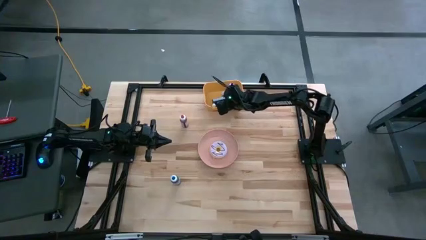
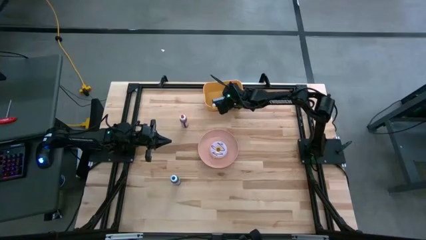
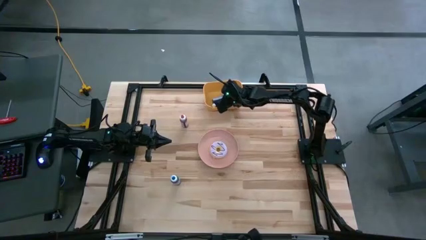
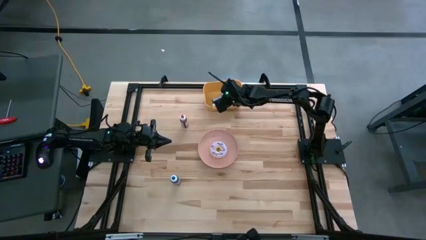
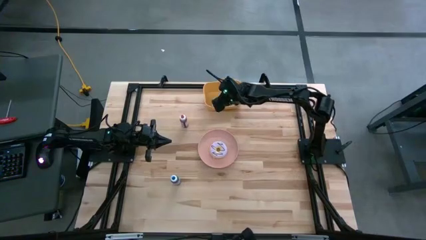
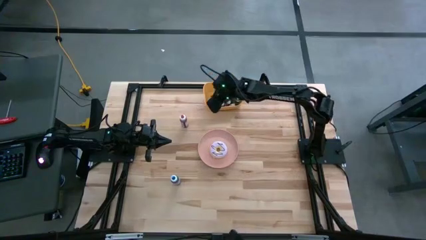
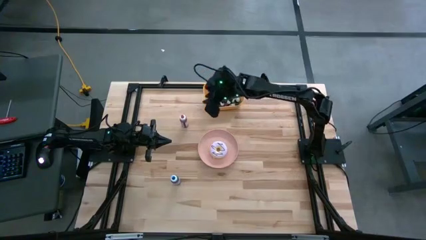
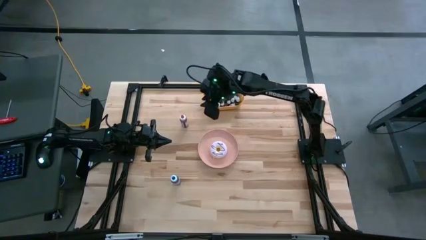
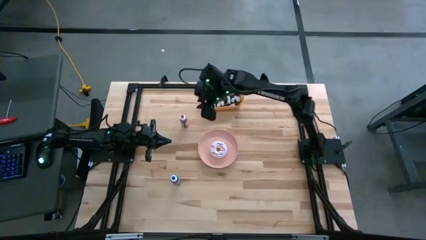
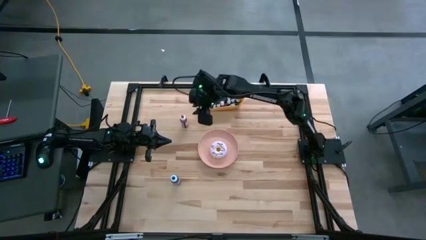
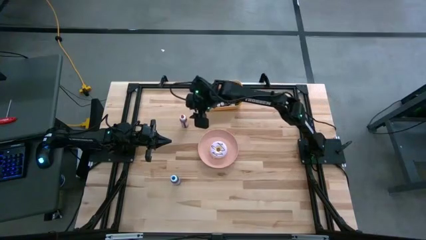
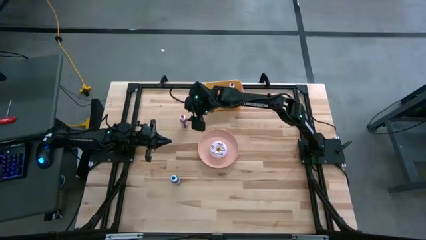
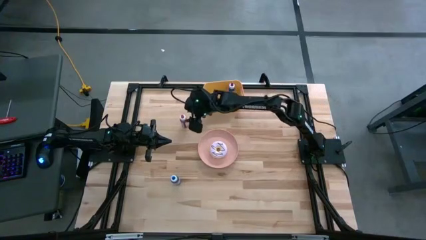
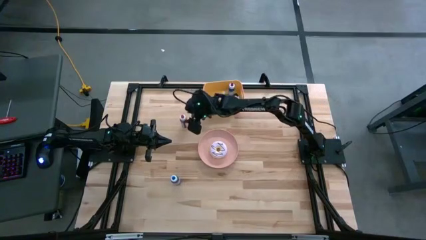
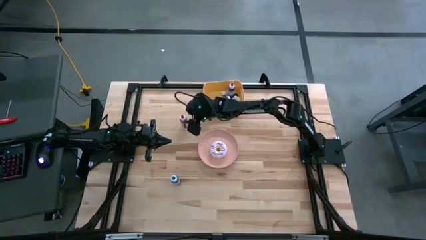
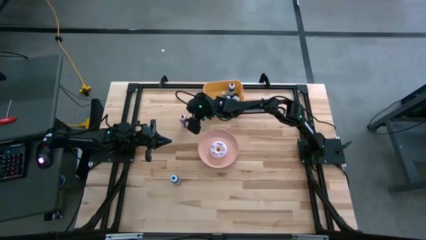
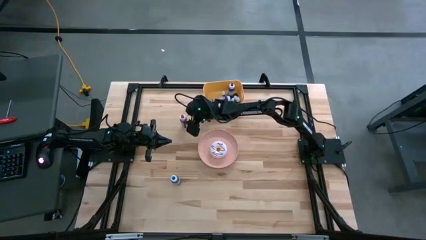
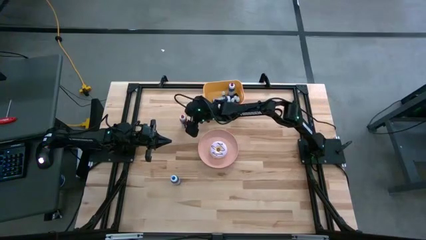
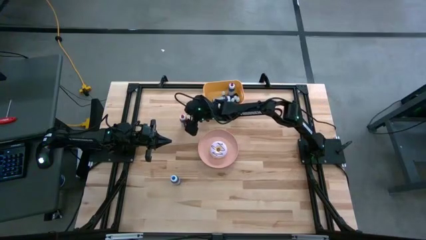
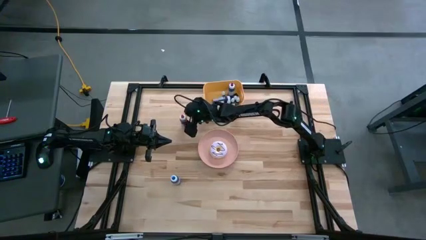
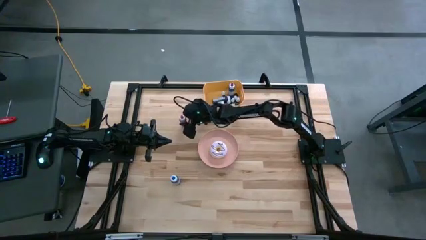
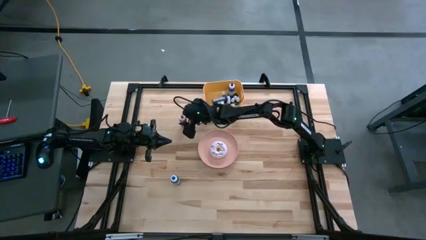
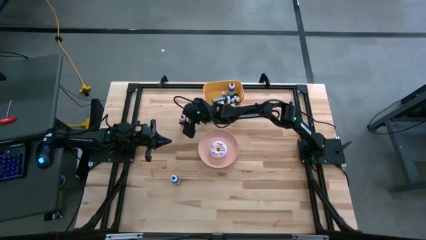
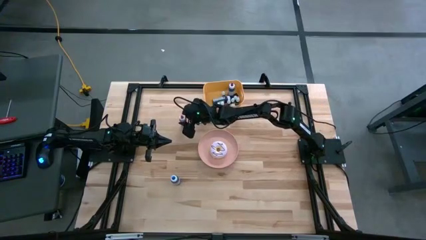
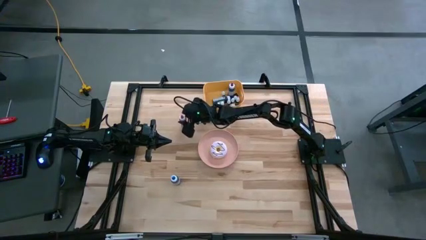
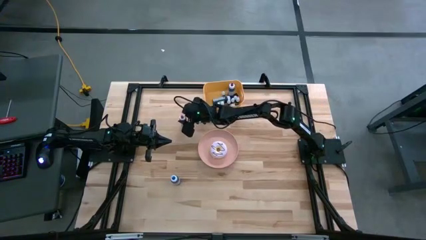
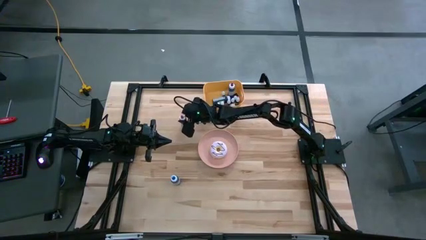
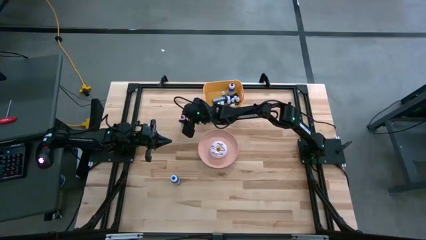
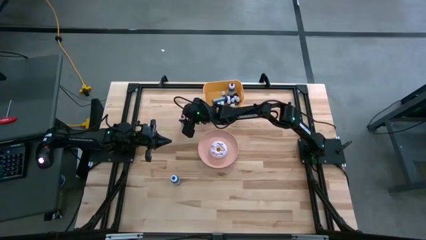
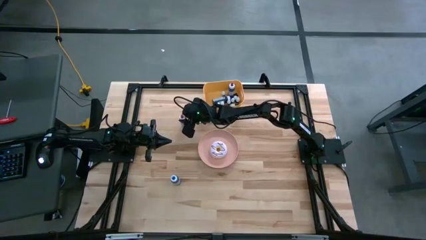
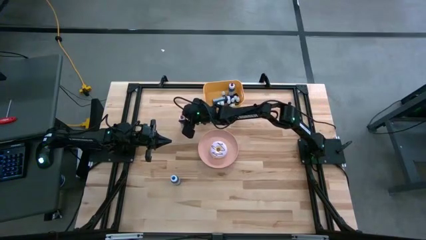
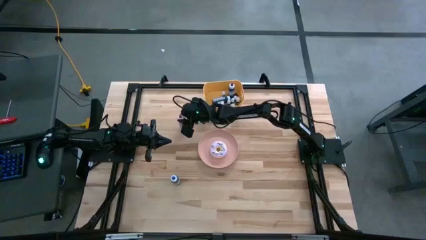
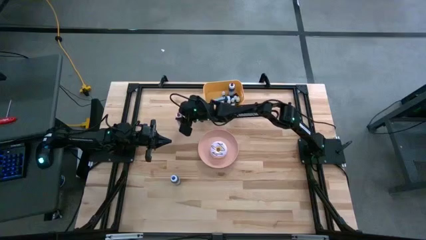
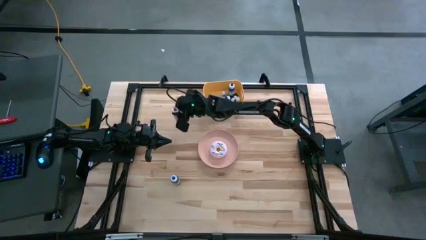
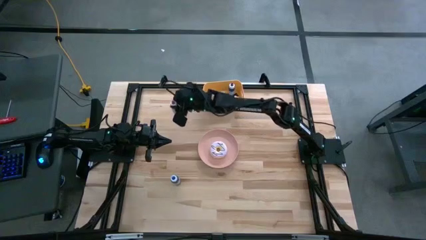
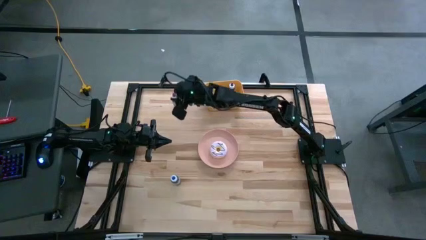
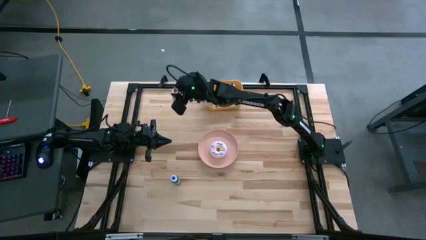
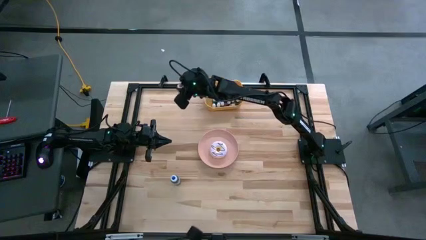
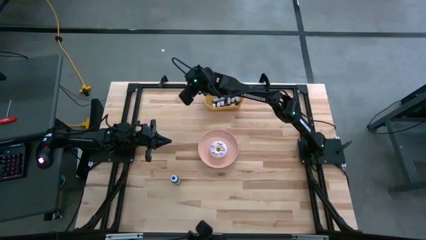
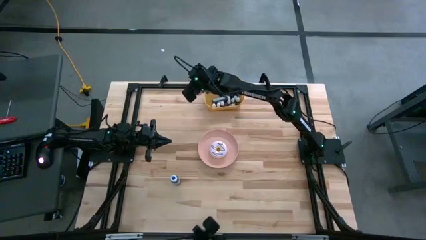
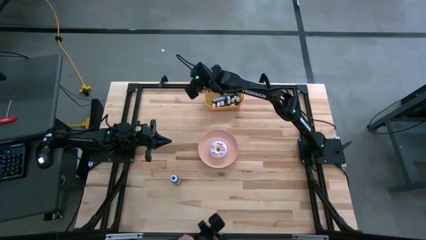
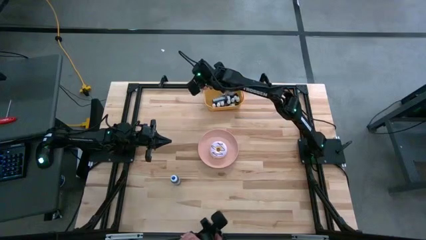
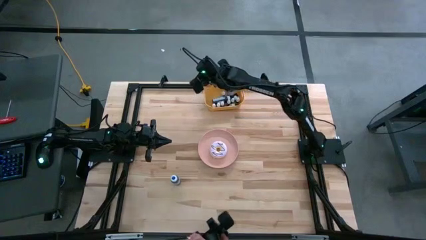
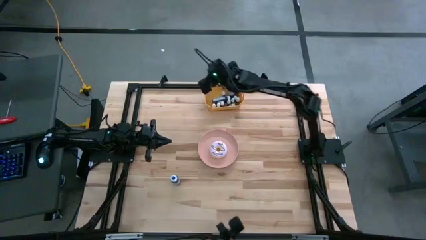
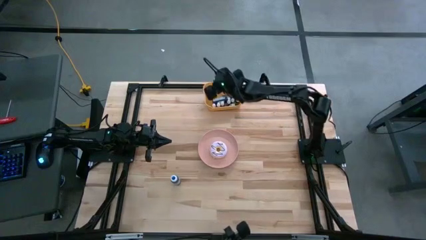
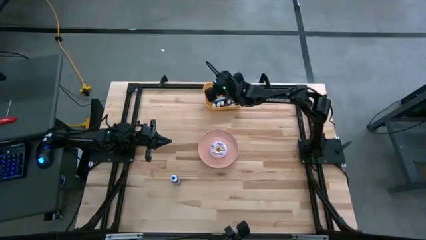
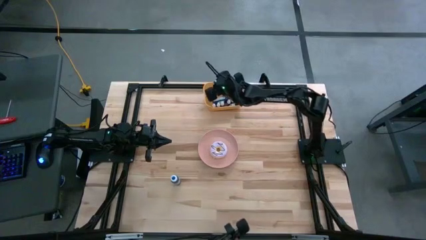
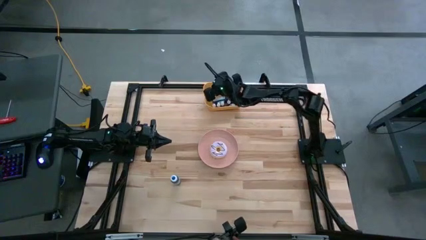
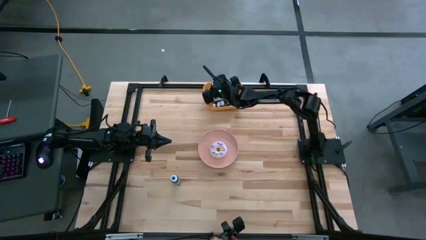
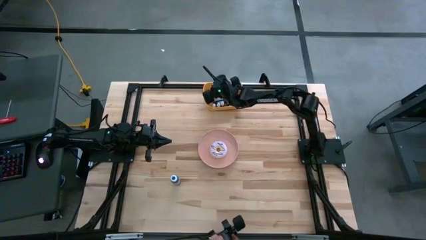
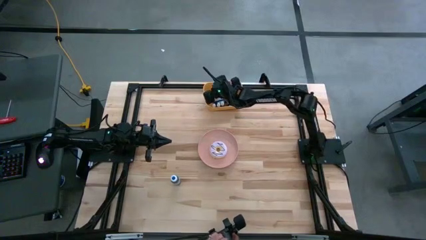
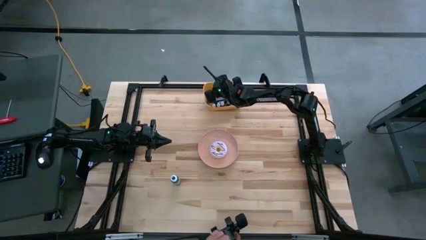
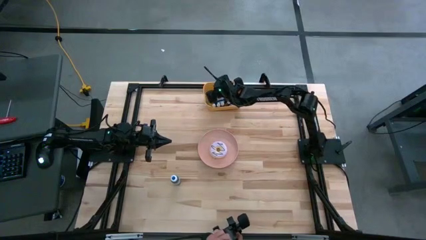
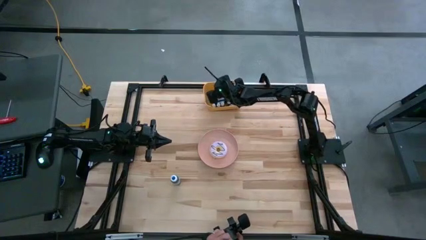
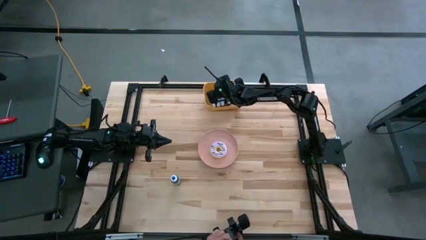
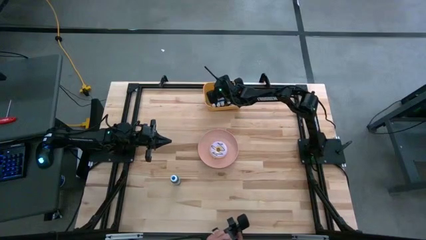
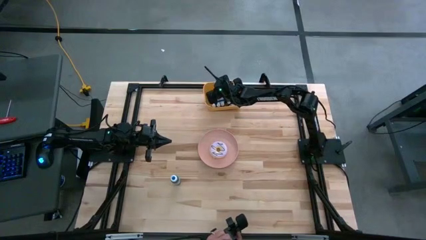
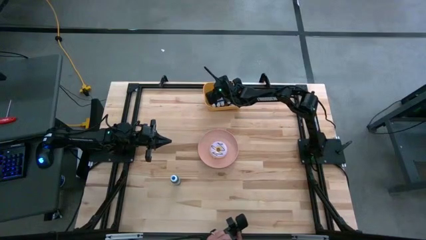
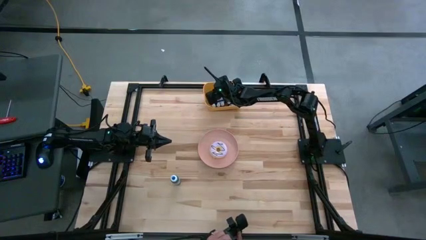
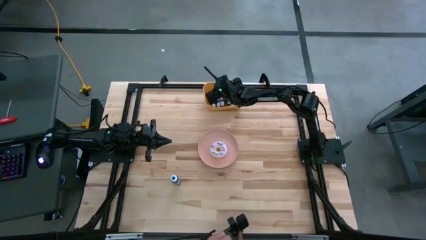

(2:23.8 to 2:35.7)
Task: Pick & Place food coloring
Put the large pink food coloring bottle into the orange bin

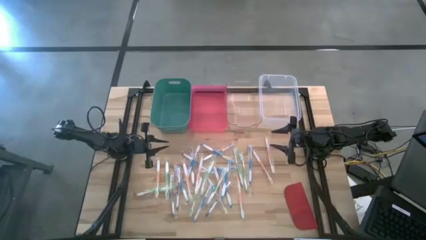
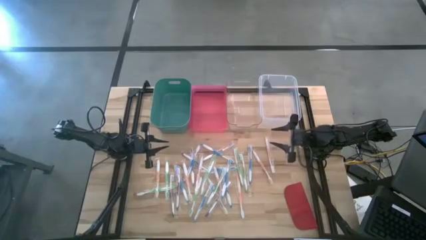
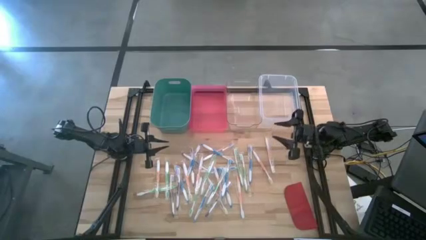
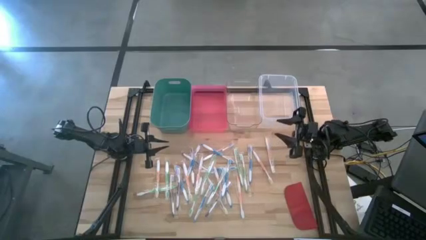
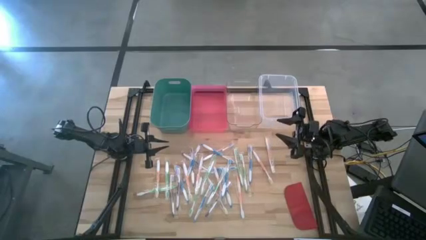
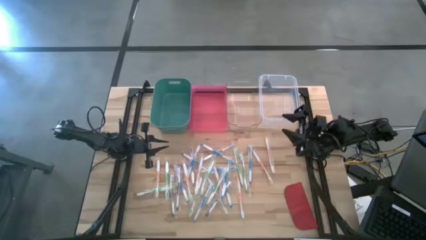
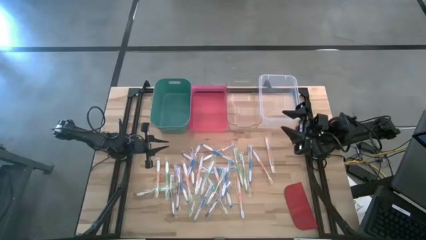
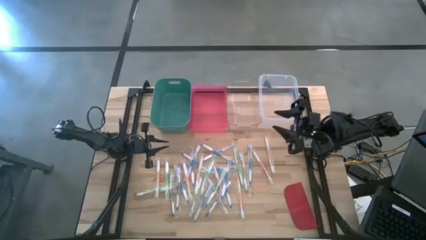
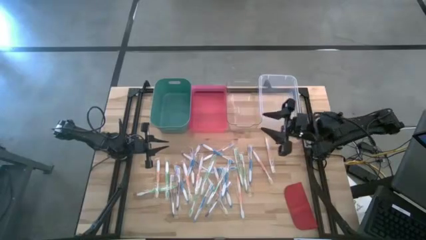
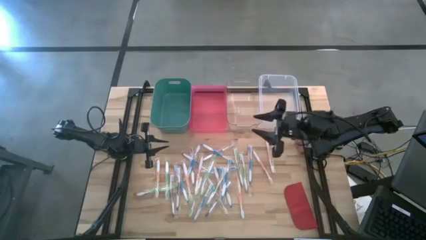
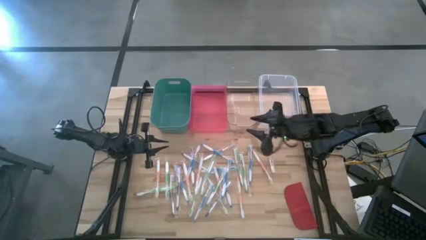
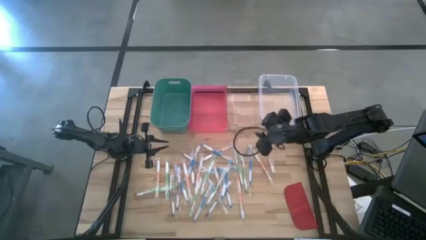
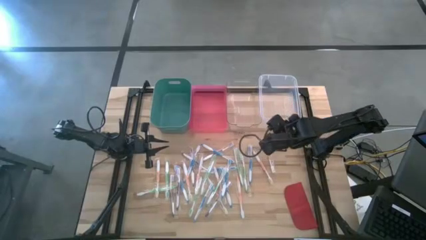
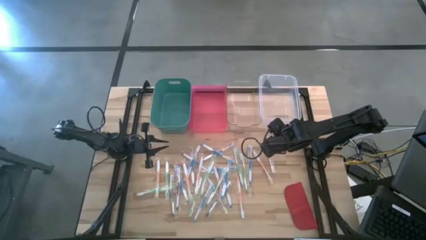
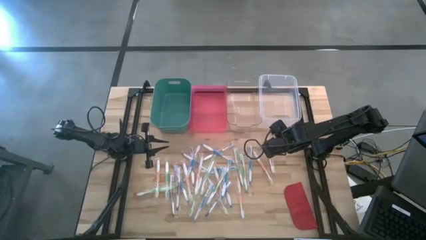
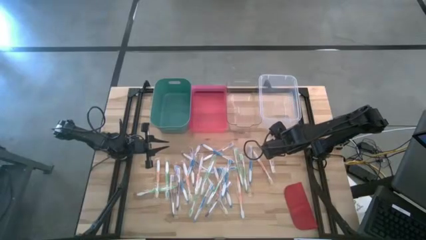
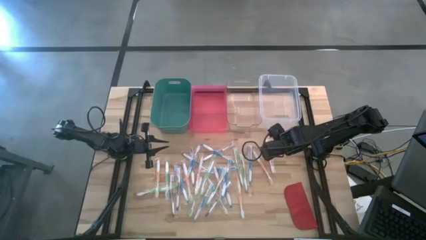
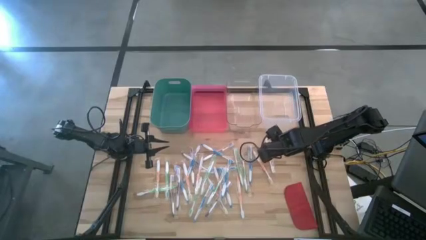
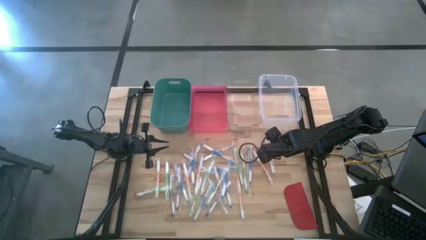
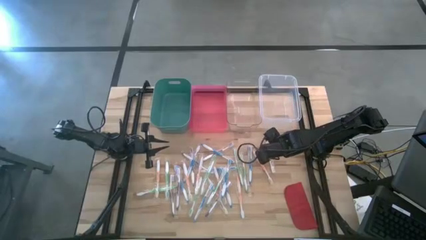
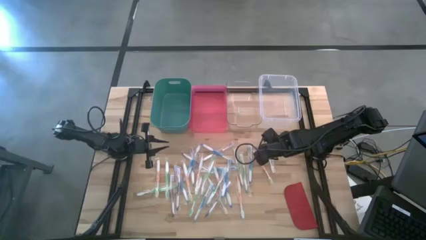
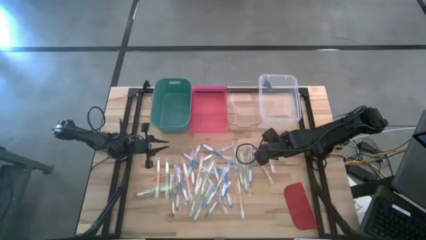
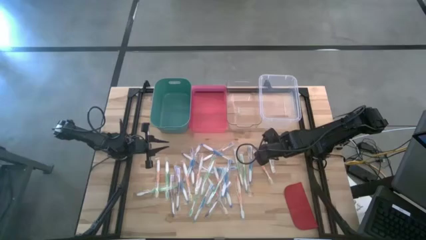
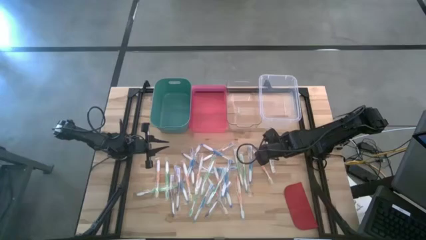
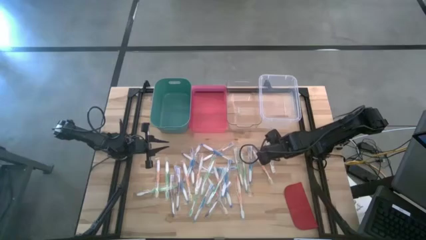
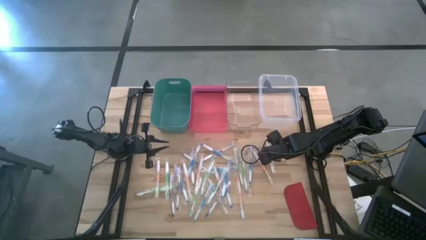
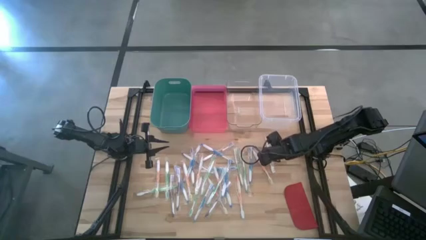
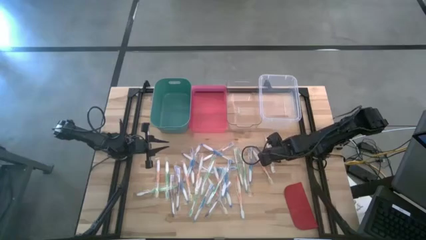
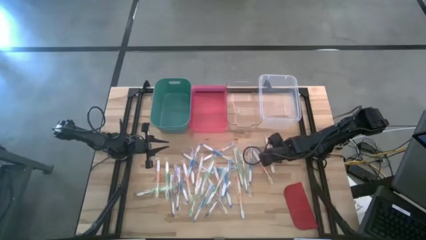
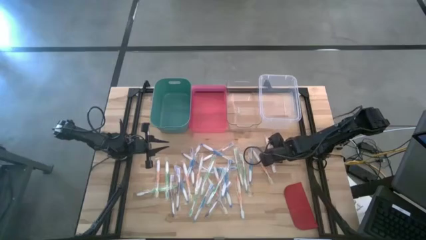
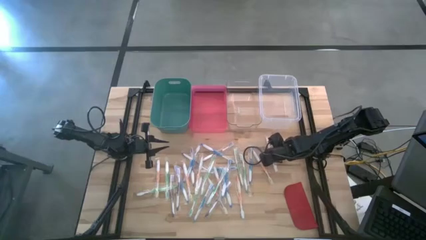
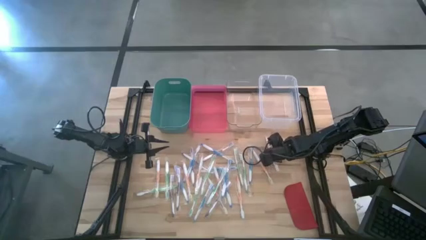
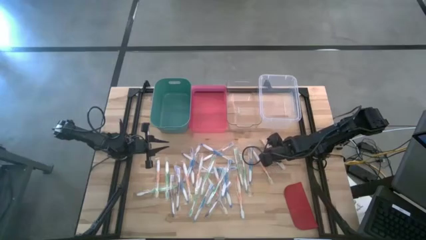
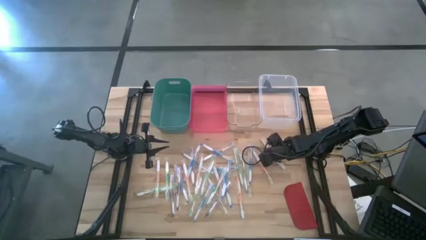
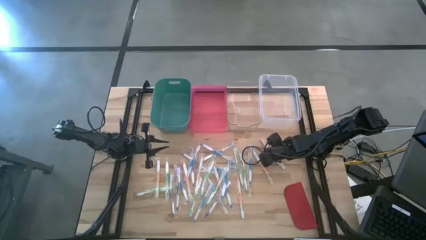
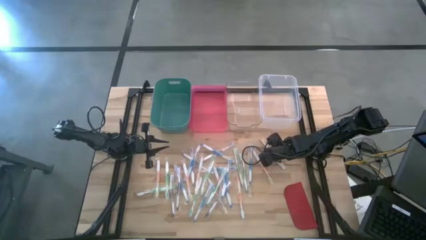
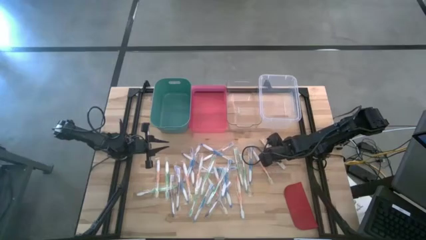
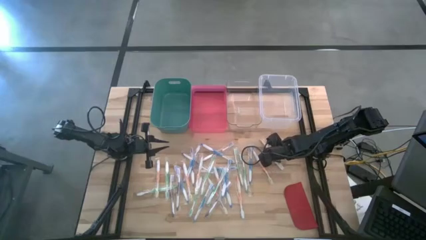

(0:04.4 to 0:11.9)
Task: Pick & Place Toothbrushes
Put the orange toothbrush into the transparent bin
